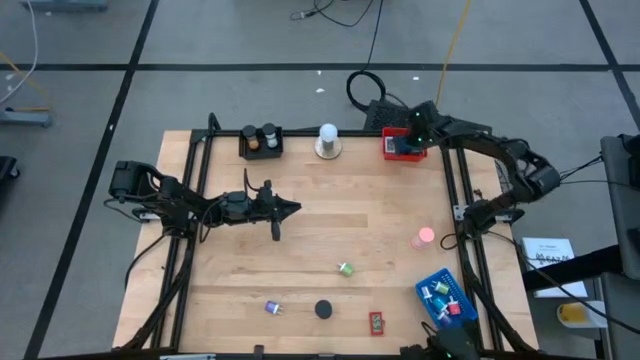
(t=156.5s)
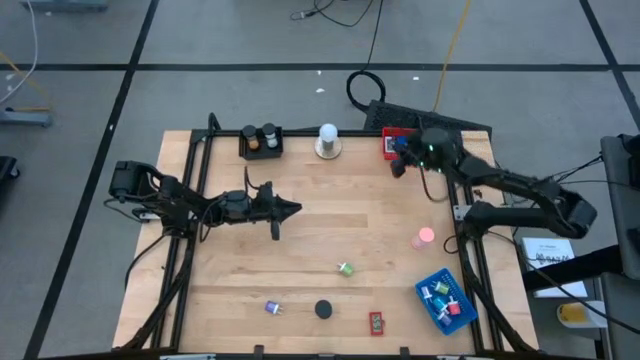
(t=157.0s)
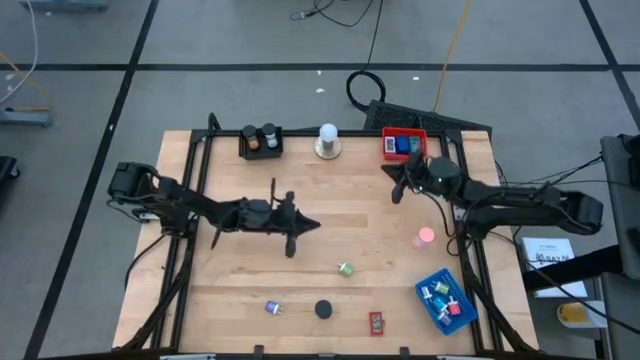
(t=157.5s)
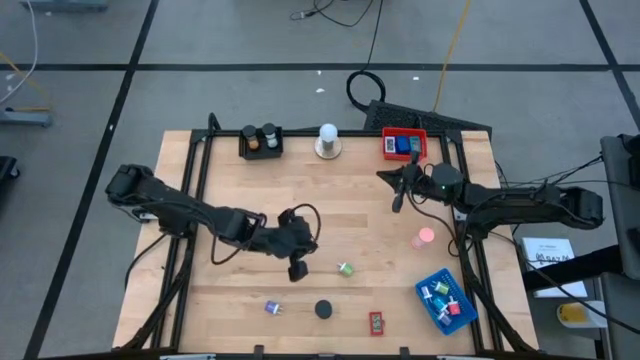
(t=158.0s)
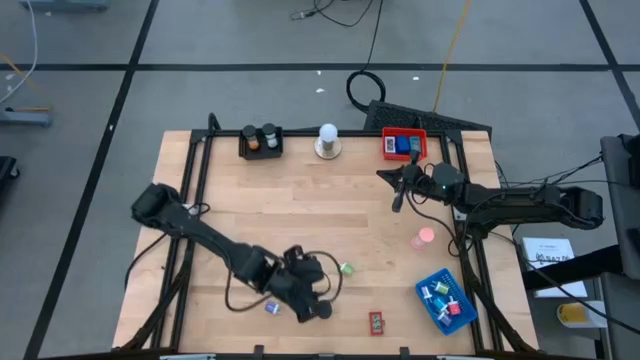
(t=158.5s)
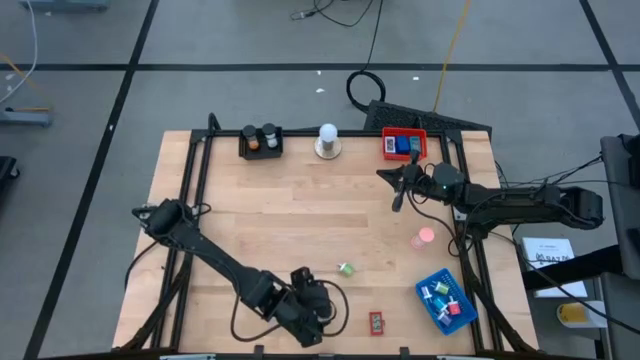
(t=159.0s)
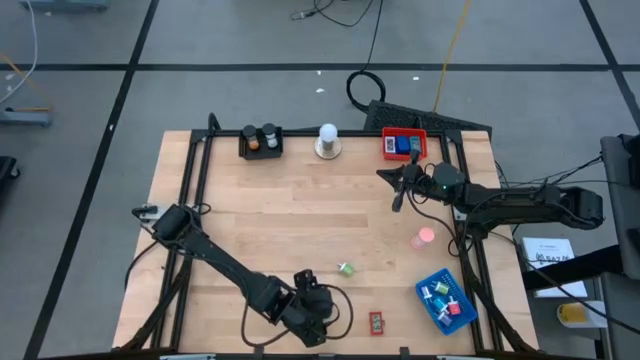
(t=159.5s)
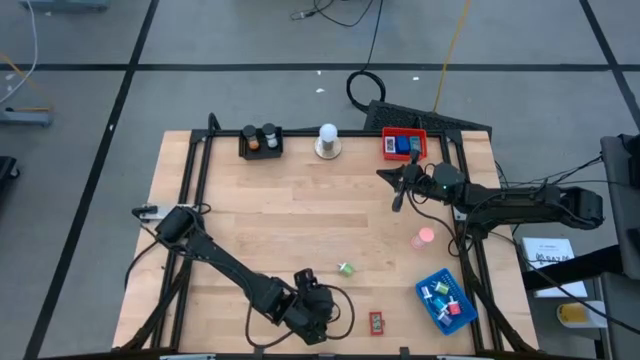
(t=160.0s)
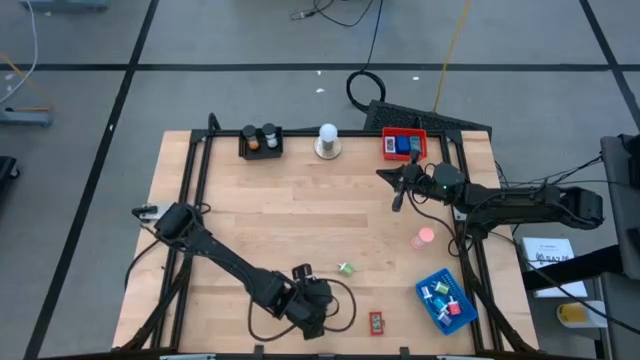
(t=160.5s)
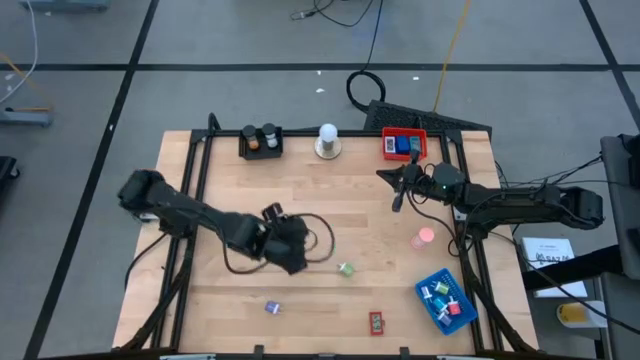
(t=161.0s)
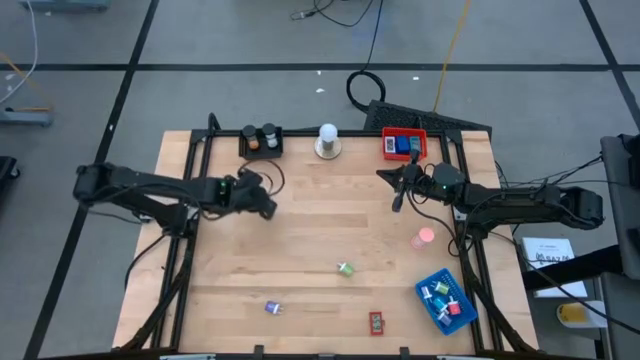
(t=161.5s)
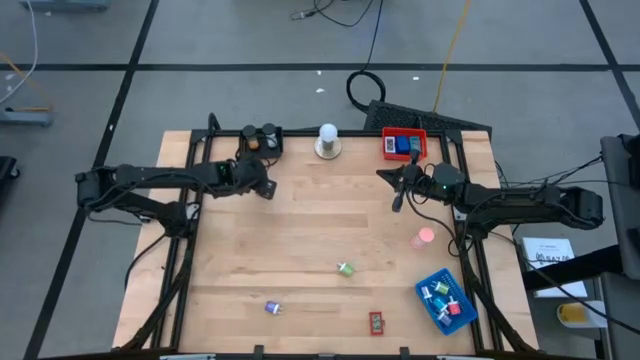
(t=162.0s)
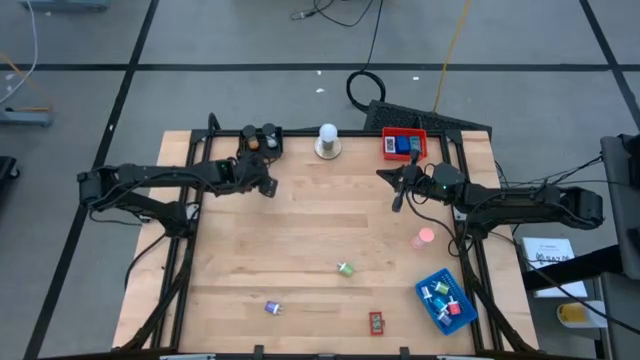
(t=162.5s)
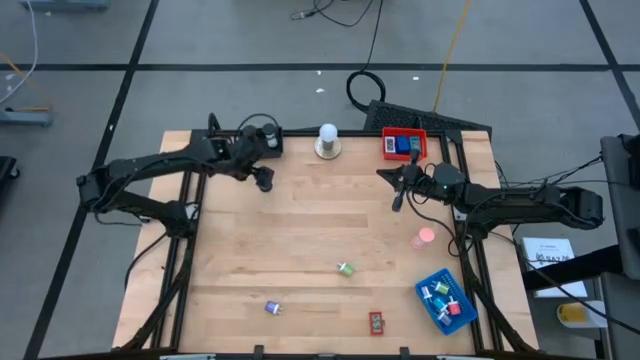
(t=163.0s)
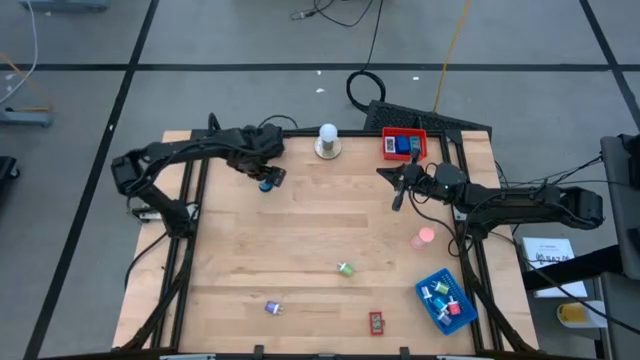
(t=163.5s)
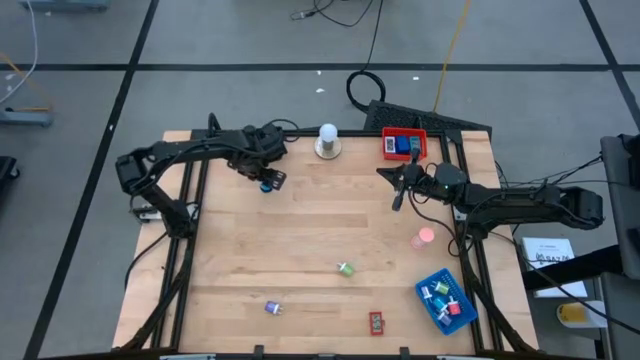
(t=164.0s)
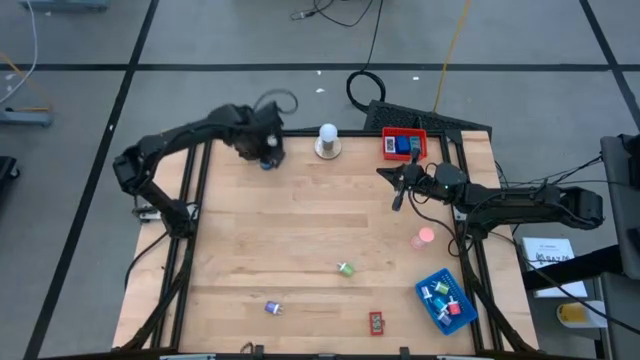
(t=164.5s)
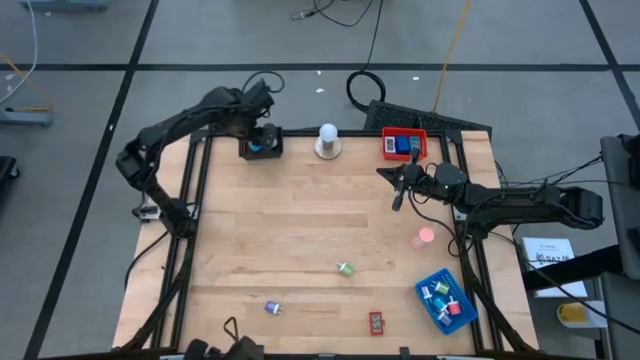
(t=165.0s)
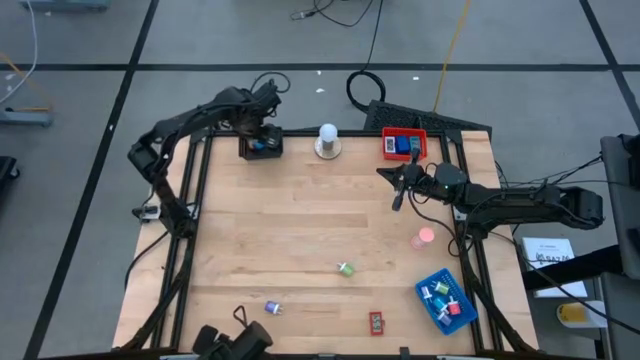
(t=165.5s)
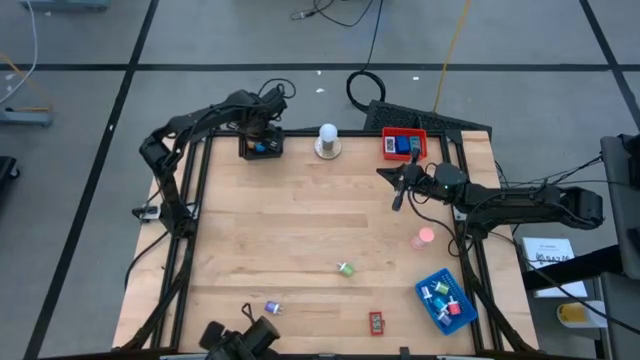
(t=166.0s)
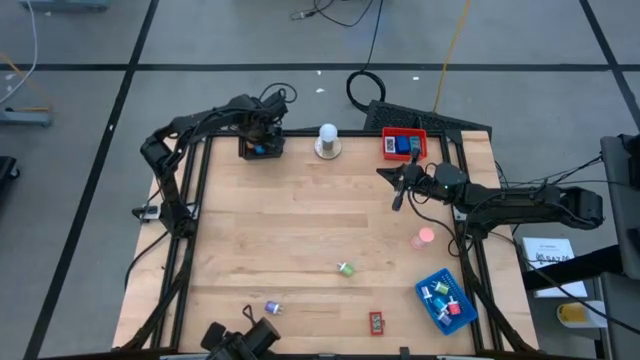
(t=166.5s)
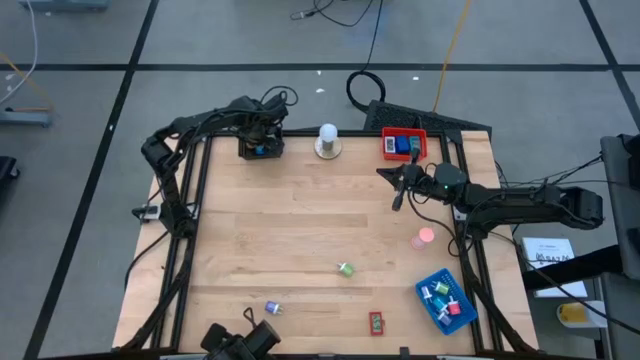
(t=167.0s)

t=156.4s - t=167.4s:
Task: Pick & Place Office items
Put the blue hourglass into the black bin

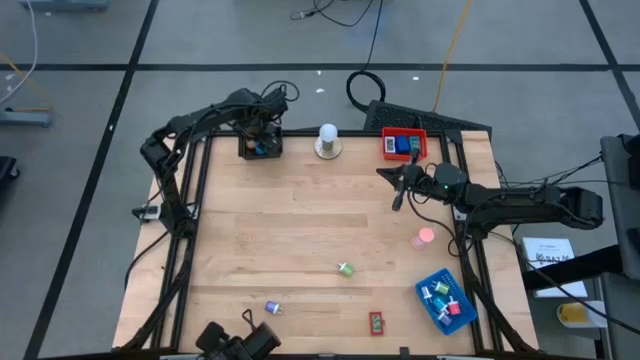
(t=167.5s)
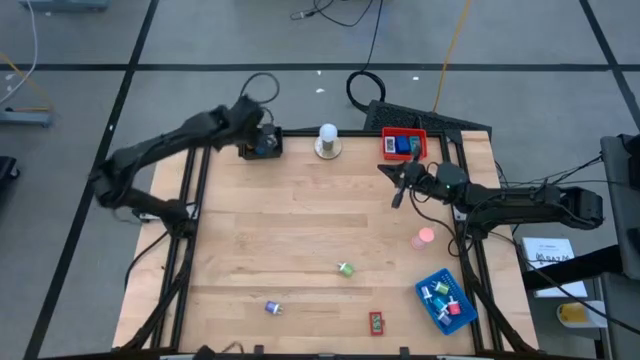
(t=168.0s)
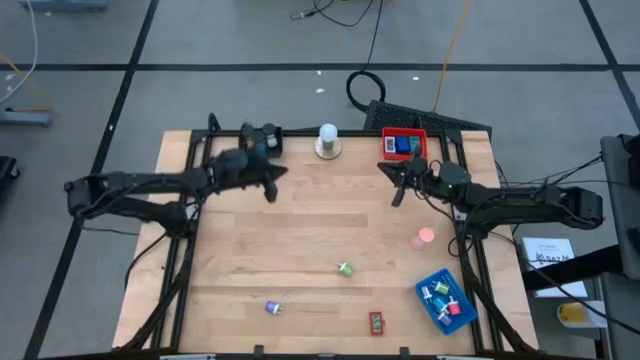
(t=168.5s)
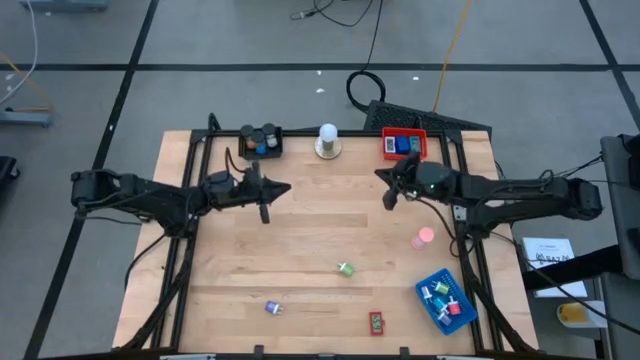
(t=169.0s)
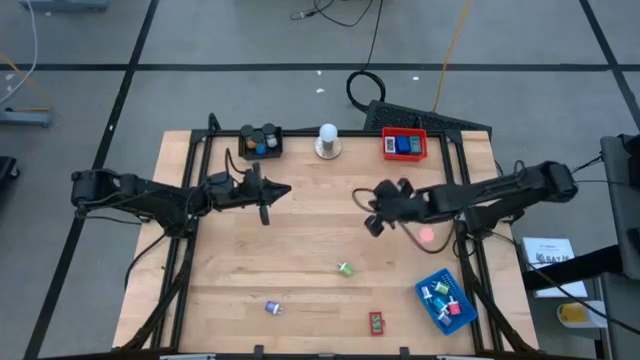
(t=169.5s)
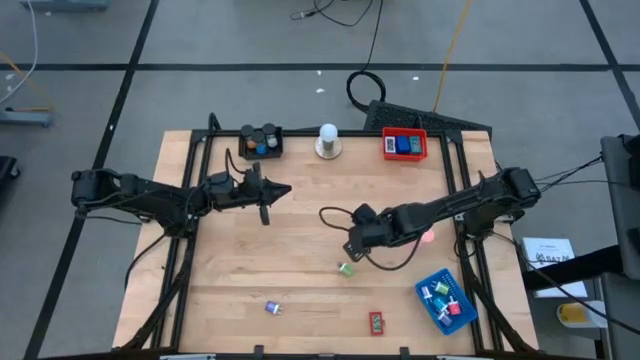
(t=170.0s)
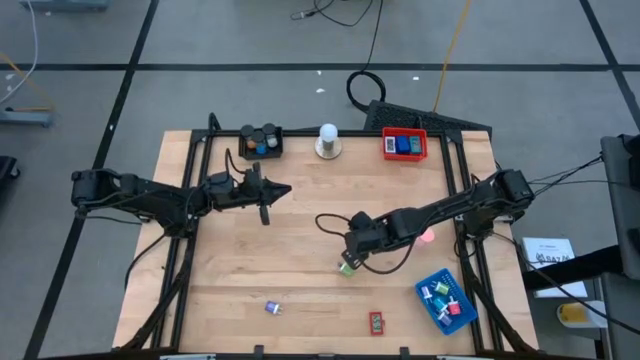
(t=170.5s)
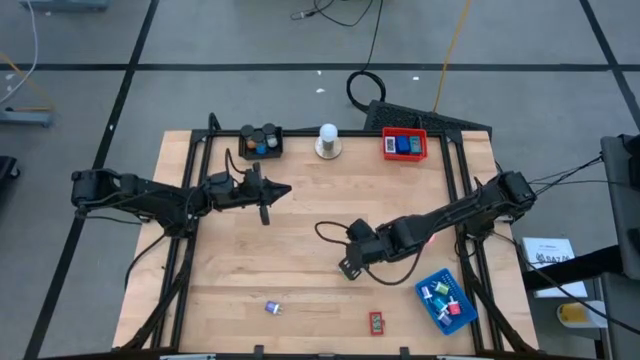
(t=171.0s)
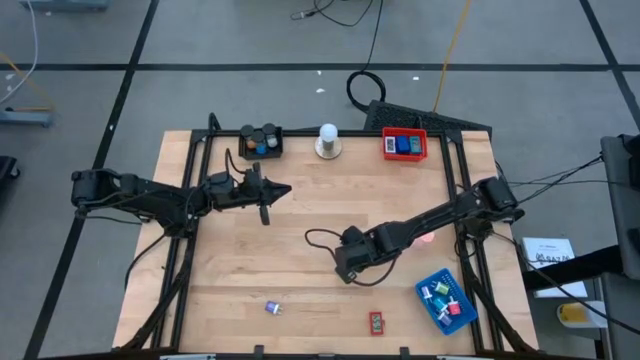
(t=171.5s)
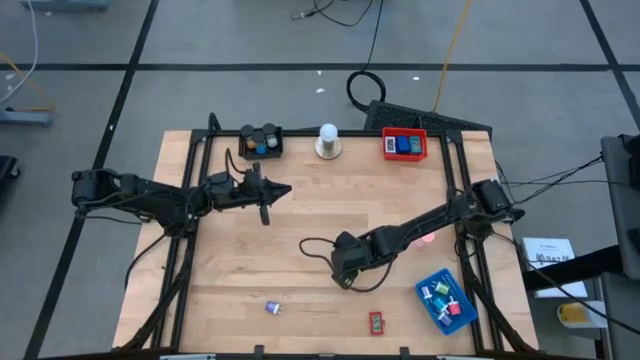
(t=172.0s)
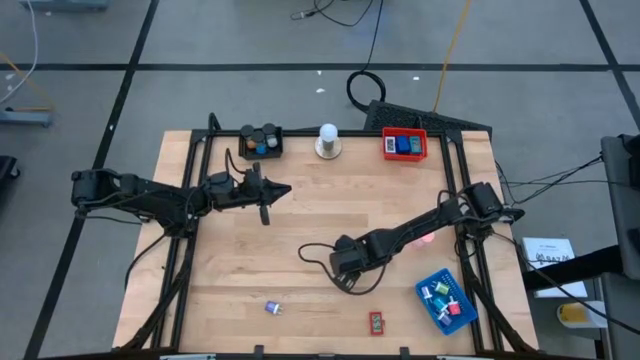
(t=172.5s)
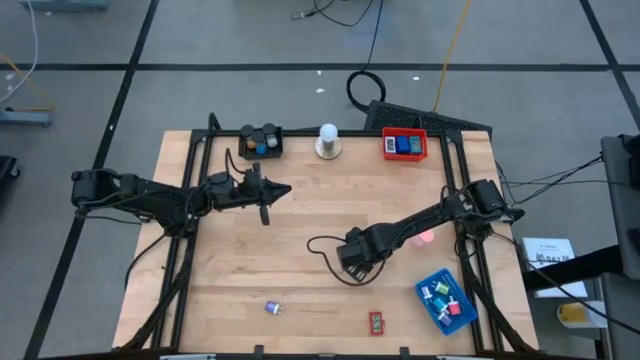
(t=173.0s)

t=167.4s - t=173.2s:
Put the green charger adapter into the blue bin

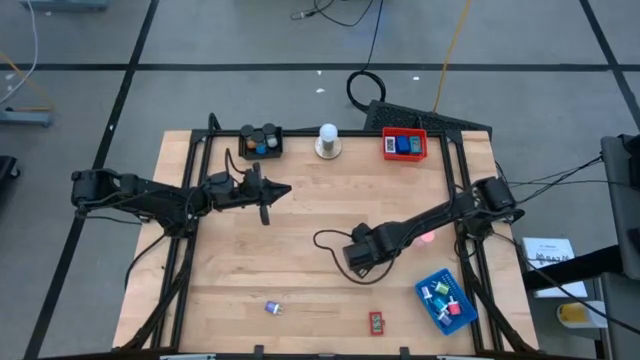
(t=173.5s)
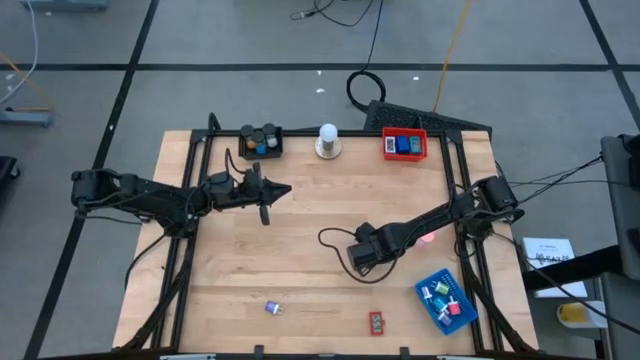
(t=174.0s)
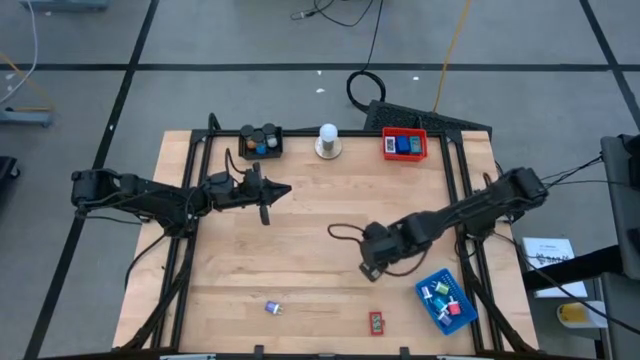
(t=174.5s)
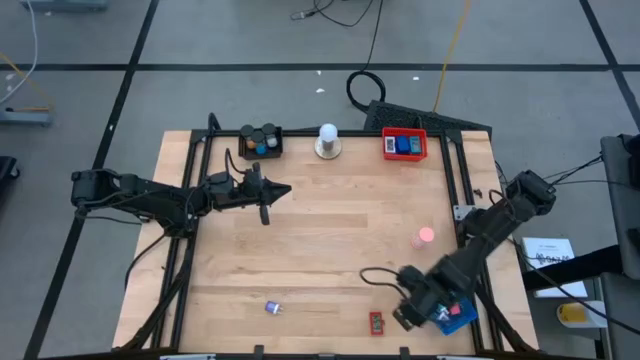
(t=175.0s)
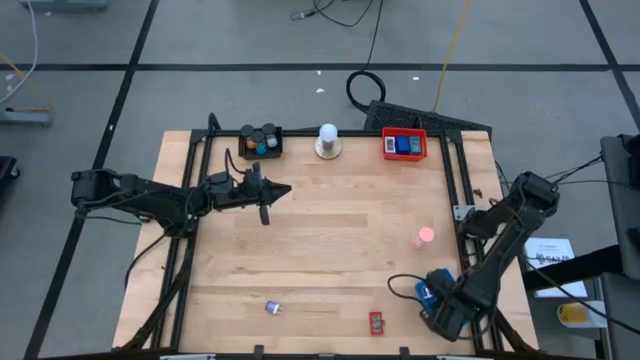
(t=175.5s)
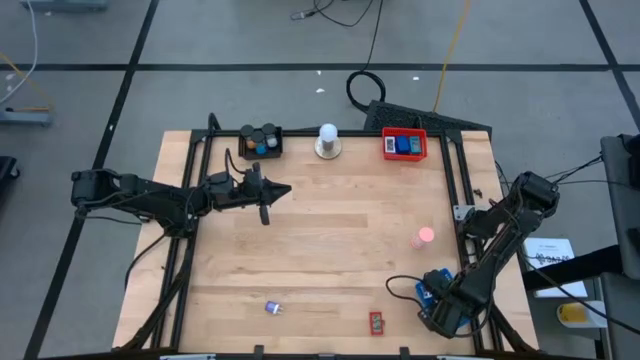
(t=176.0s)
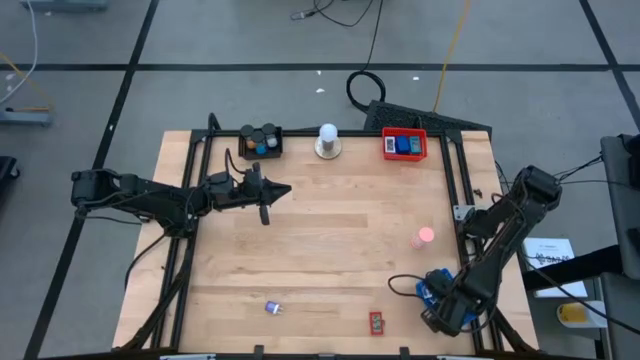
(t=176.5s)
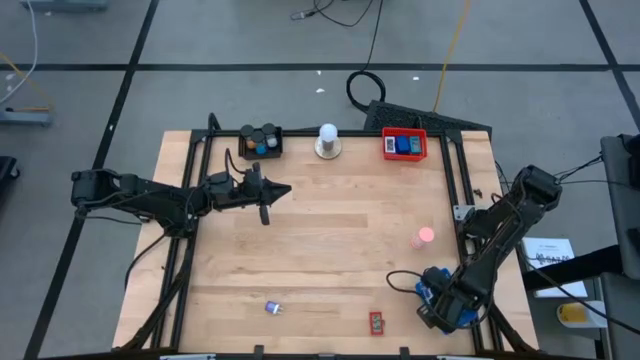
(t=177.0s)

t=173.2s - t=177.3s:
Put the green charger adapter into the blue bin
